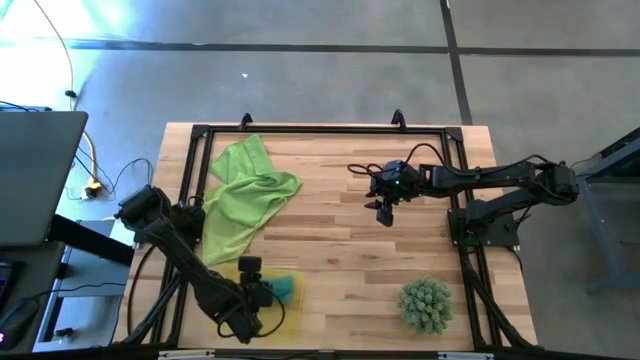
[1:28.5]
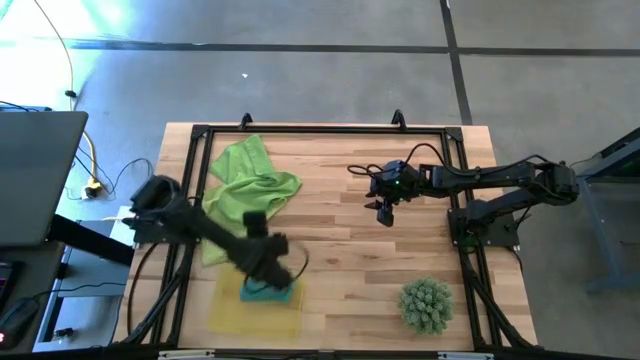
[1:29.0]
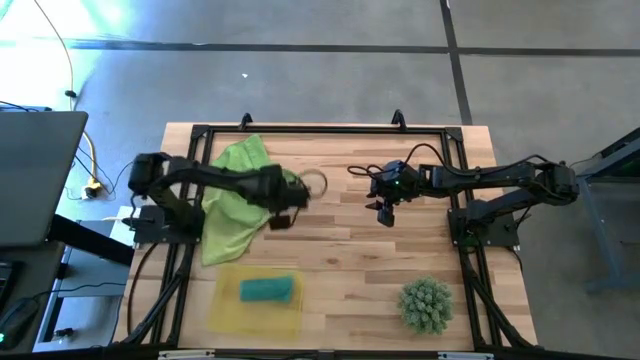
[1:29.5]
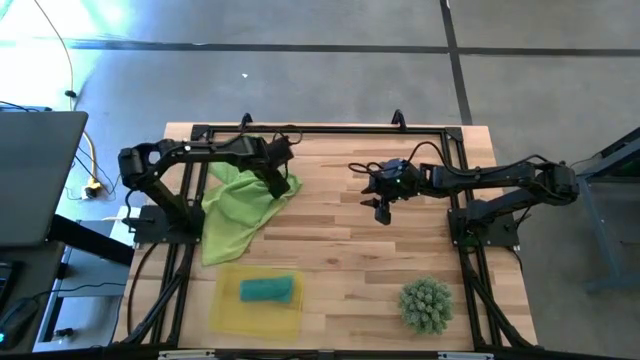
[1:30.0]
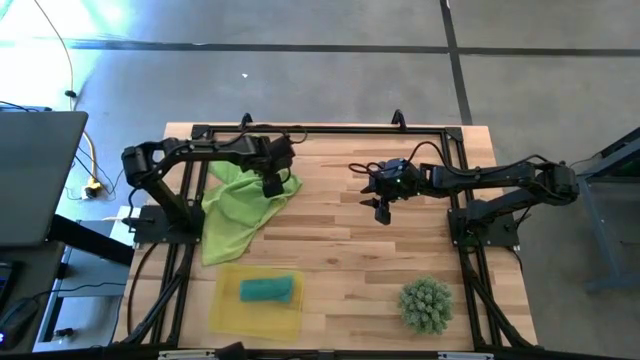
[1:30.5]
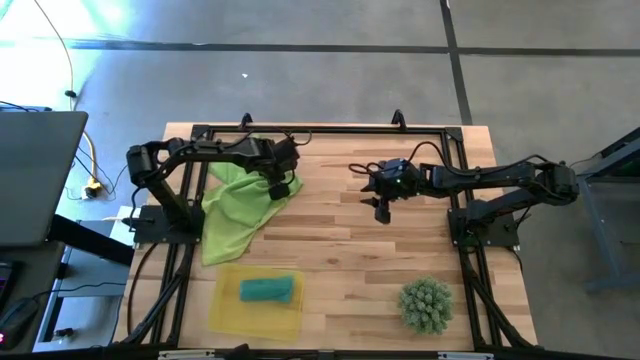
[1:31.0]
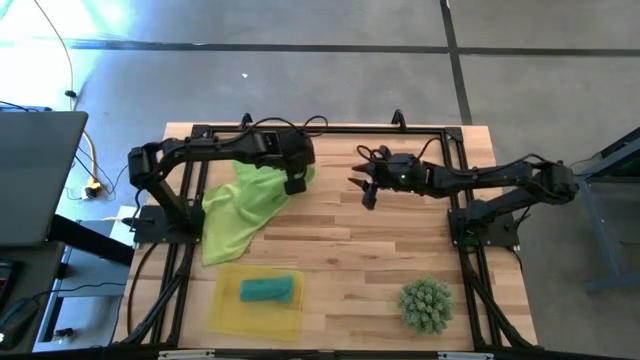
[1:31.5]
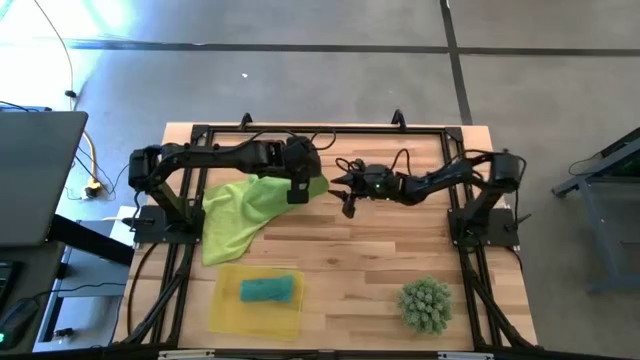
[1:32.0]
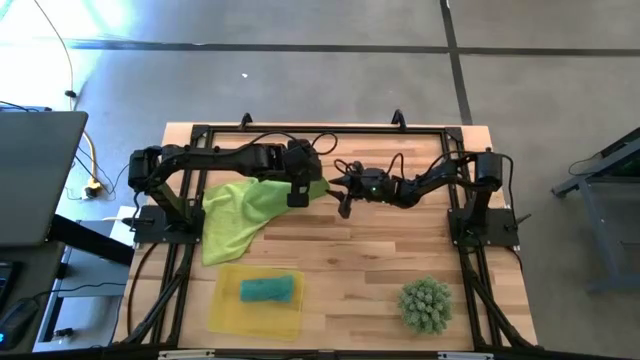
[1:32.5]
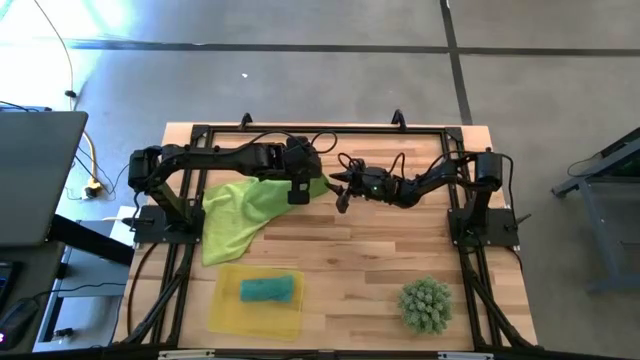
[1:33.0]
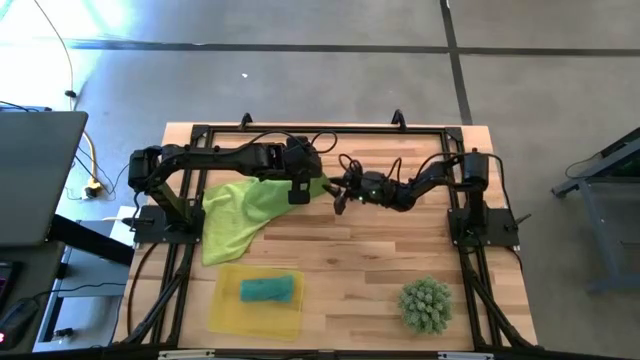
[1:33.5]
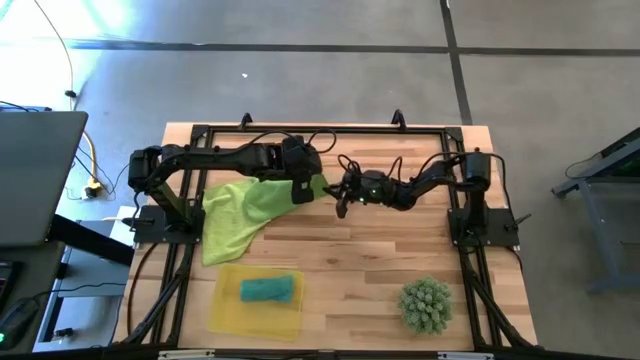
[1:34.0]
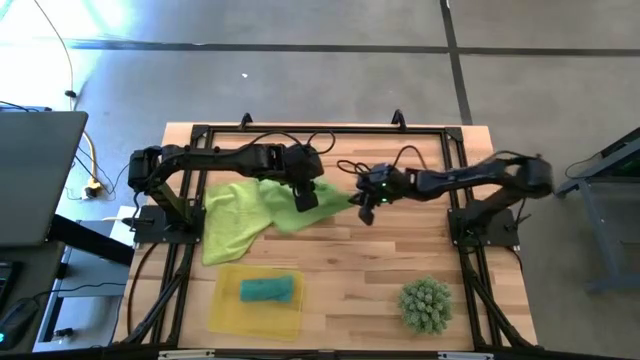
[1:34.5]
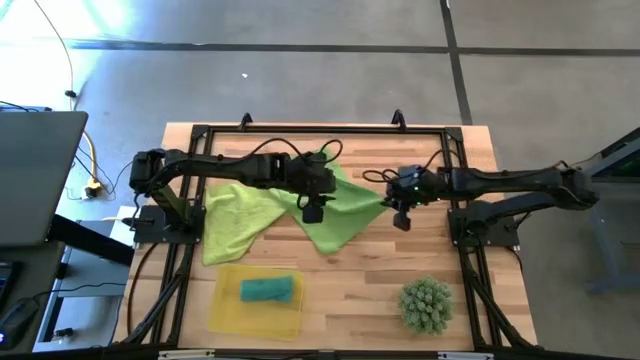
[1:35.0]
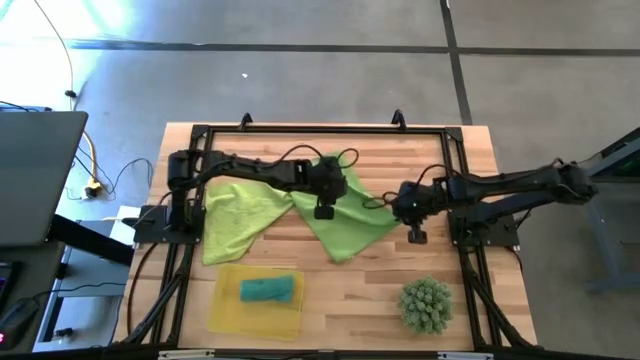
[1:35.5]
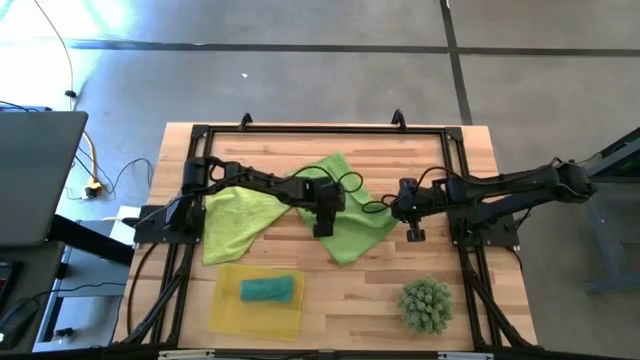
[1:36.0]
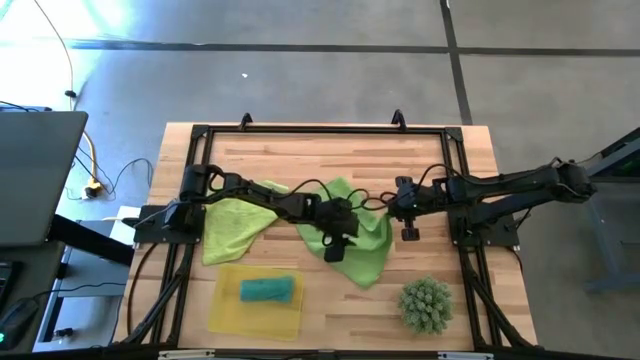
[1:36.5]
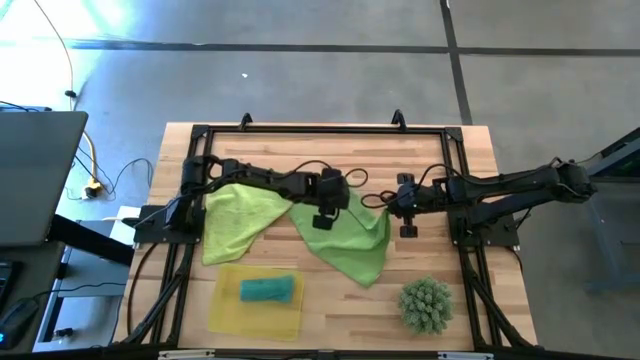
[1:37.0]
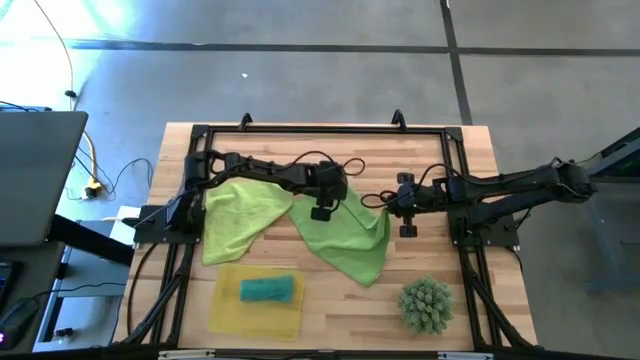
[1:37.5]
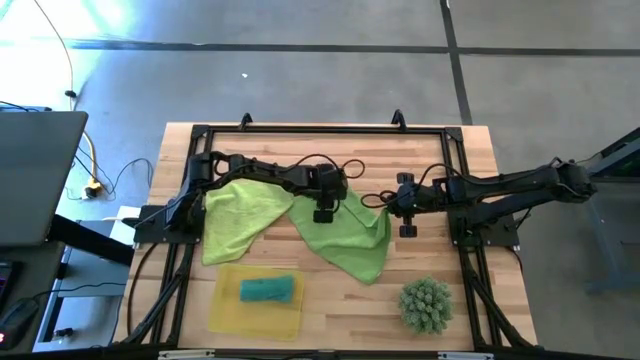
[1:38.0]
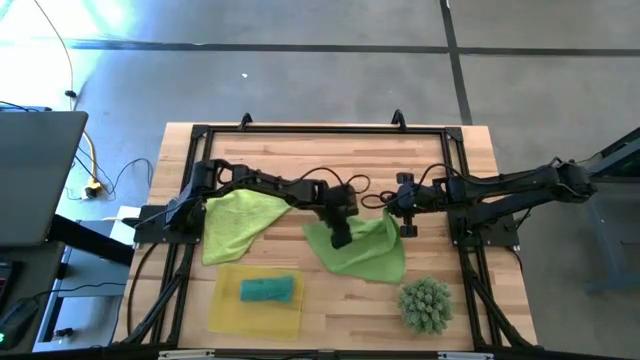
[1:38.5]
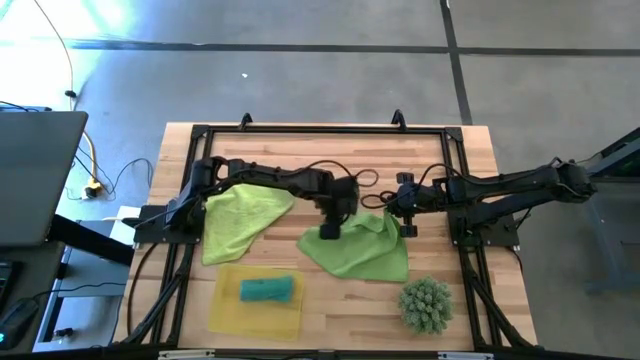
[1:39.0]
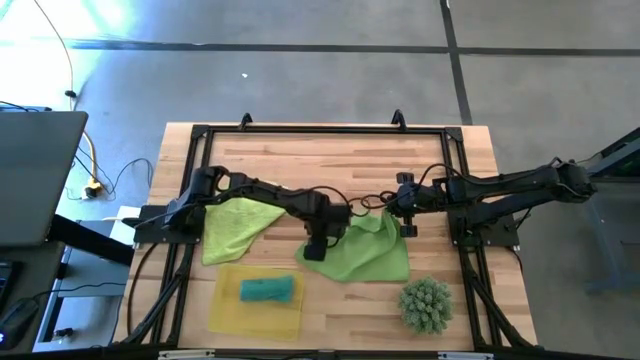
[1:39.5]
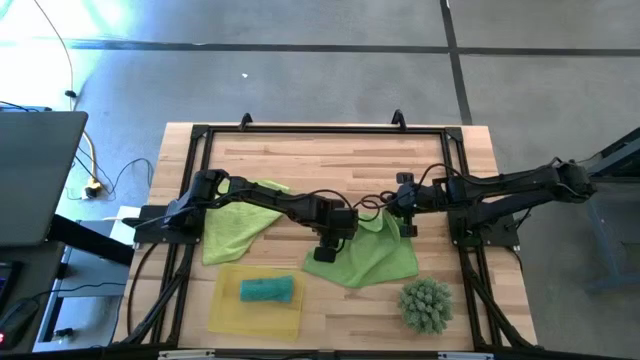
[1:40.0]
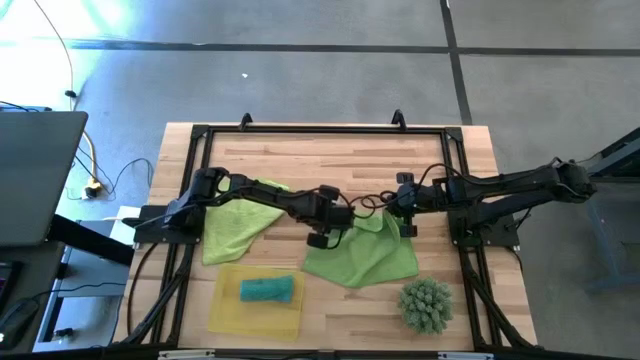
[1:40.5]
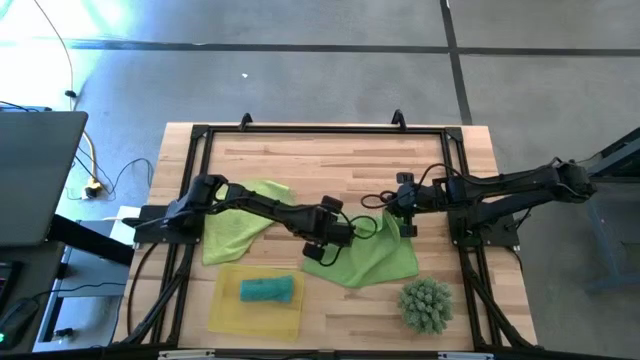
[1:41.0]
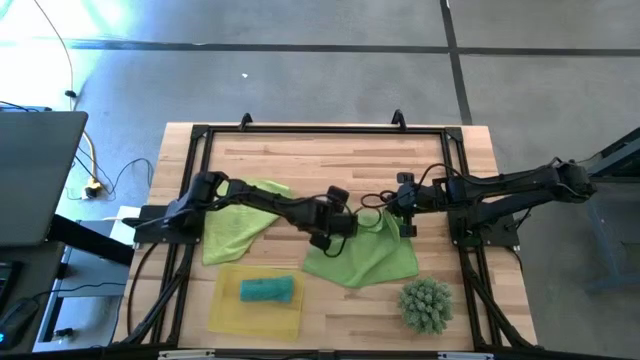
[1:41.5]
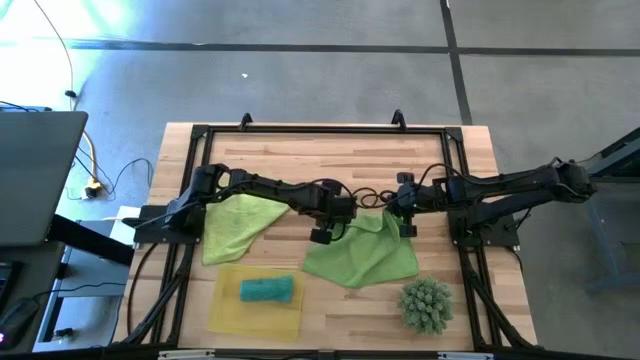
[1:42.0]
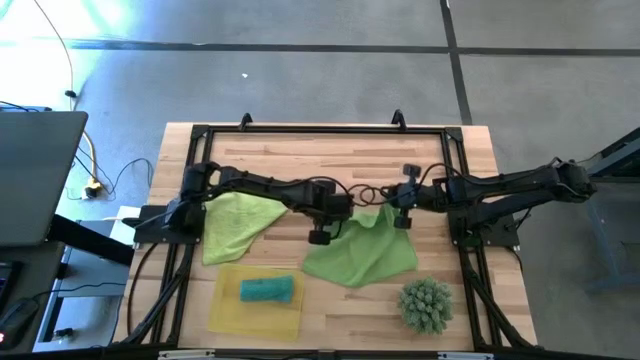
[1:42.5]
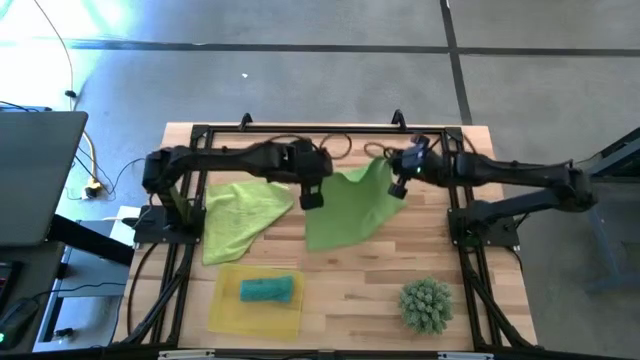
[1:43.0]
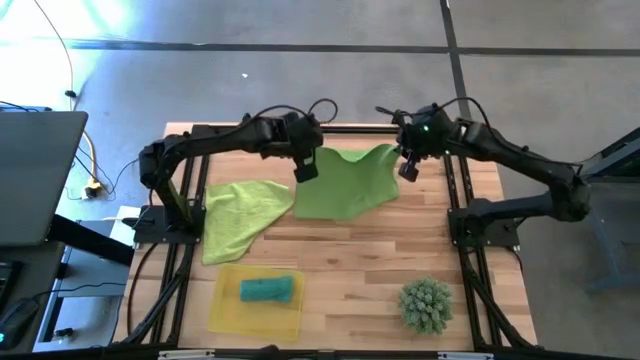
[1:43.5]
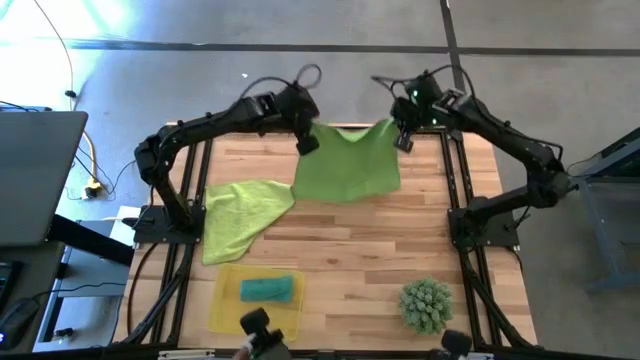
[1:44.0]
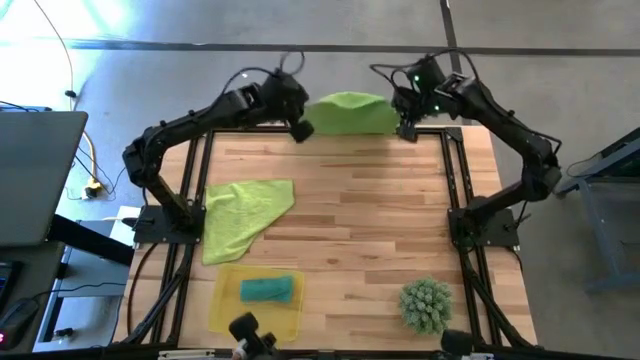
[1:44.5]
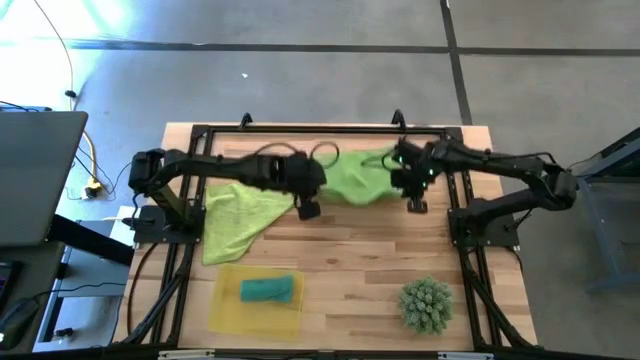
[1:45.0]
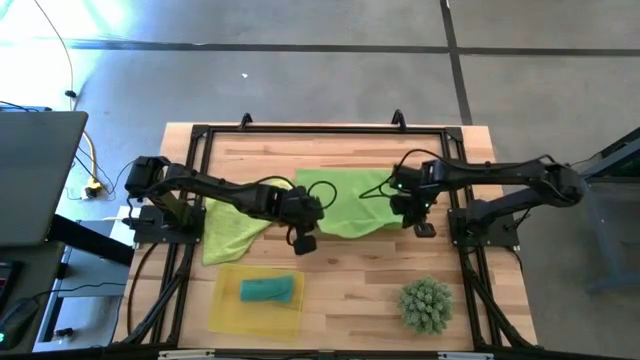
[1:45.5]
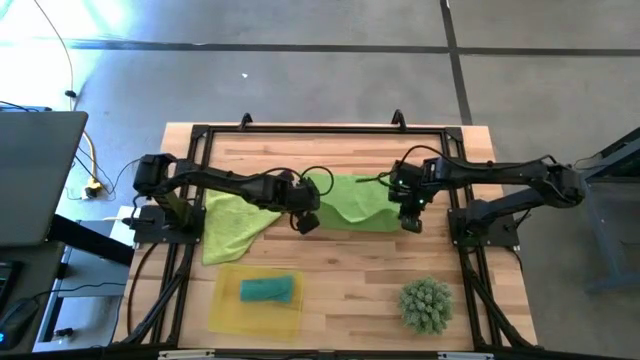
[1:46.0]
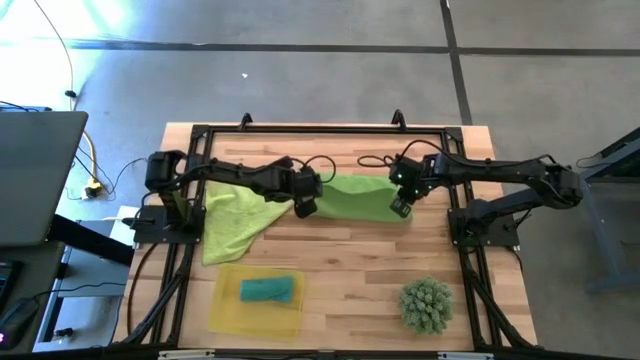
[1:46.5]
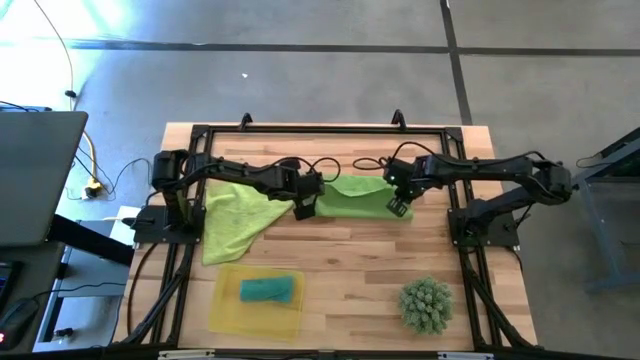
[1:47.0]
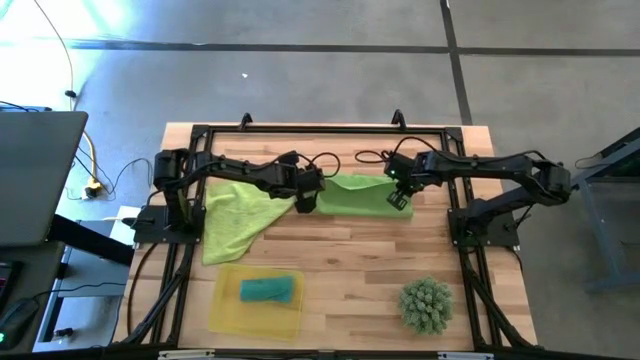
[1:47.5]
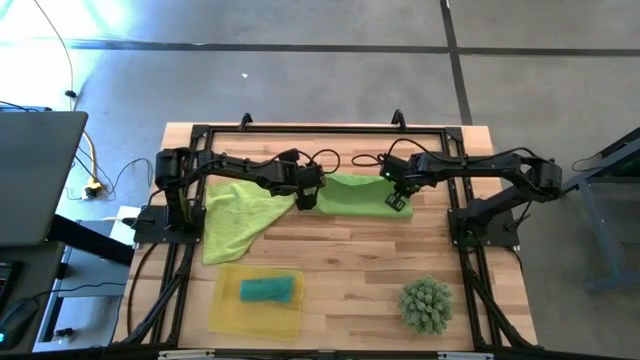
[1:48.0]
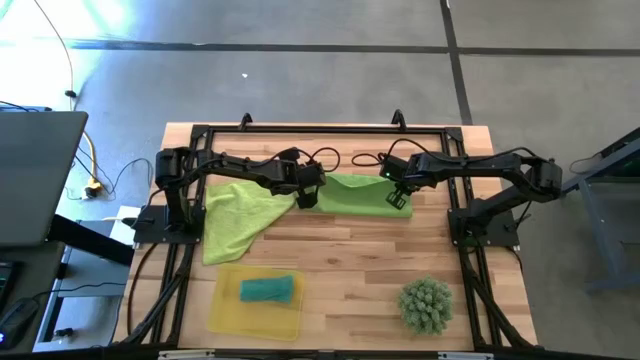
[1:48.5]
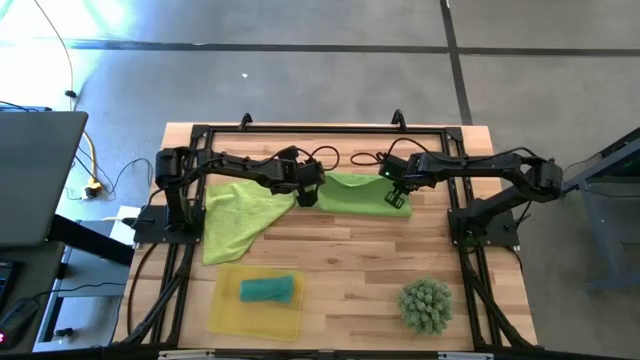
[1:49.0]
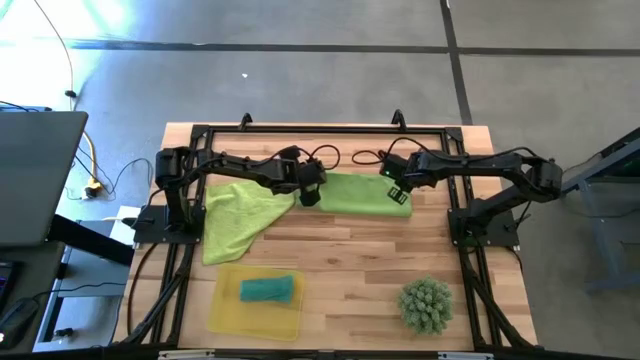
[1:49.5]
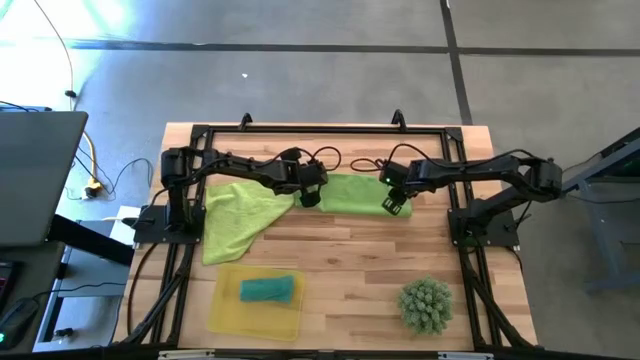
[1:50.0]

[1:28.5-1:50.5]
Task: Roll microfiber towels into tight, uniform cylinder then place into a basket
Fold the green microfiber towel
